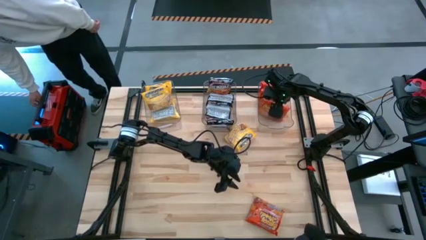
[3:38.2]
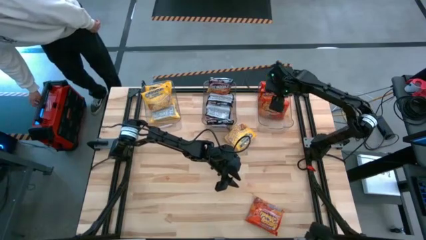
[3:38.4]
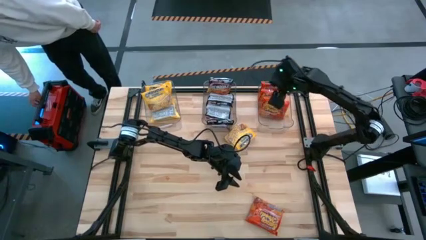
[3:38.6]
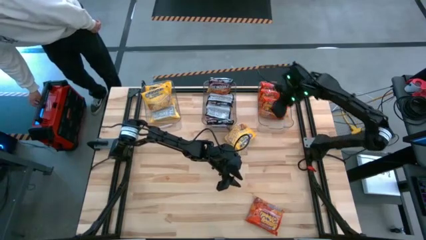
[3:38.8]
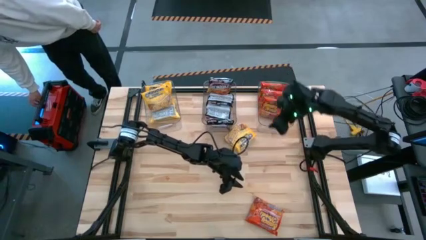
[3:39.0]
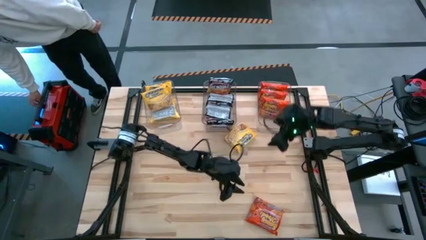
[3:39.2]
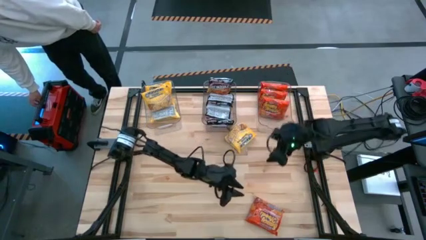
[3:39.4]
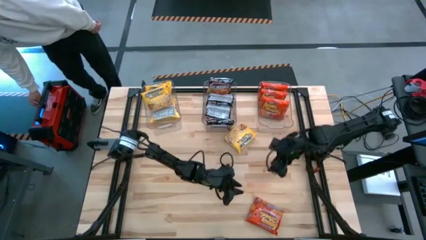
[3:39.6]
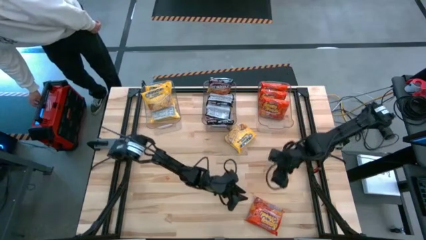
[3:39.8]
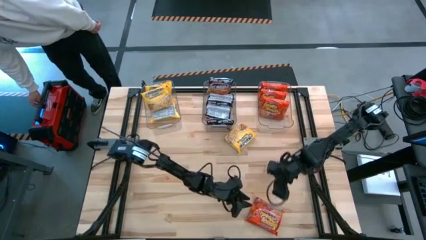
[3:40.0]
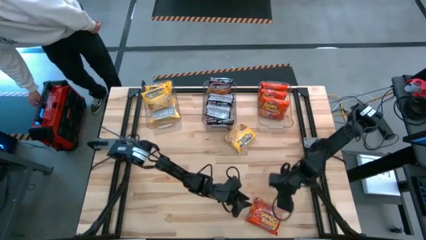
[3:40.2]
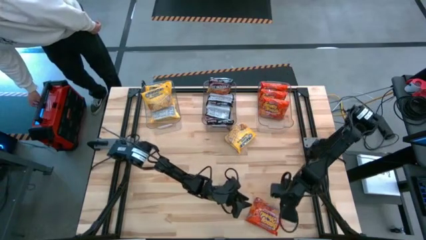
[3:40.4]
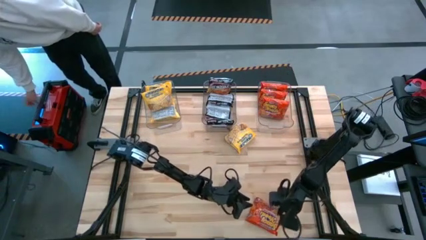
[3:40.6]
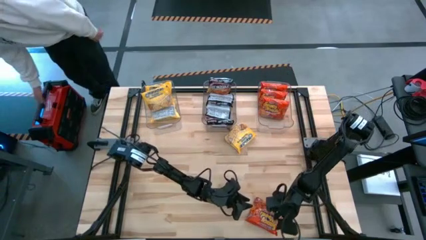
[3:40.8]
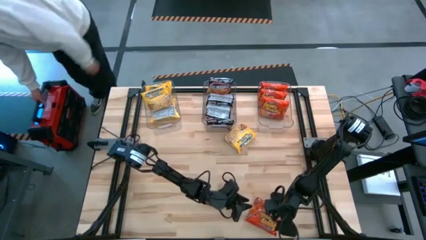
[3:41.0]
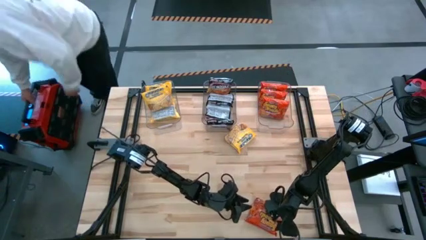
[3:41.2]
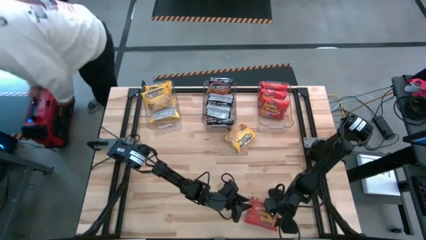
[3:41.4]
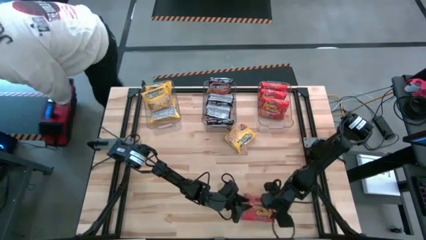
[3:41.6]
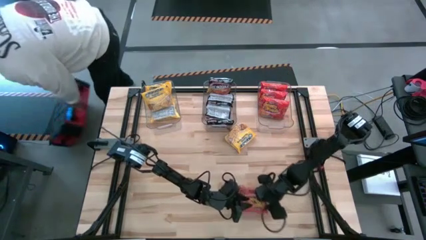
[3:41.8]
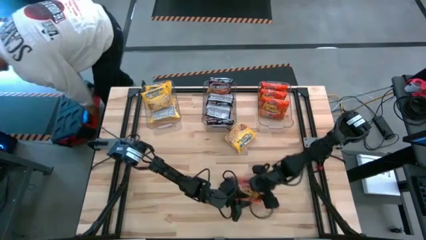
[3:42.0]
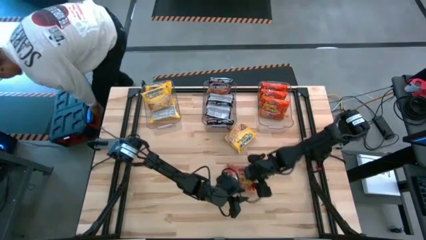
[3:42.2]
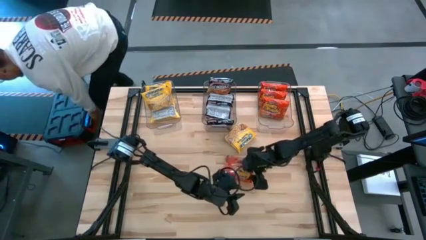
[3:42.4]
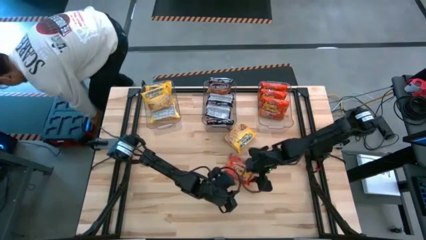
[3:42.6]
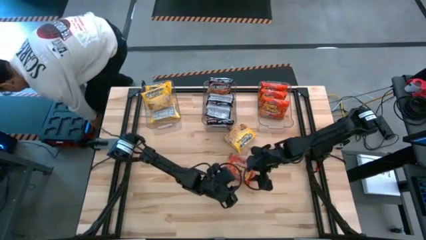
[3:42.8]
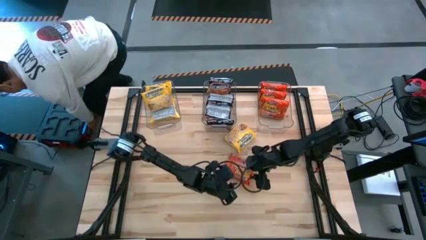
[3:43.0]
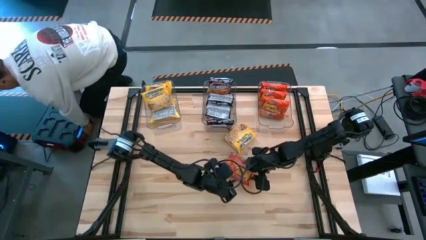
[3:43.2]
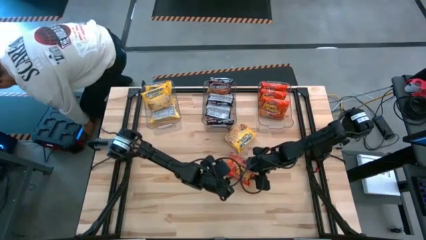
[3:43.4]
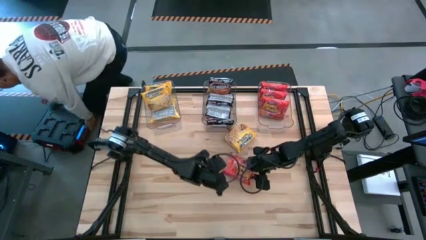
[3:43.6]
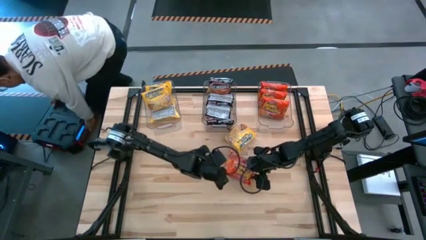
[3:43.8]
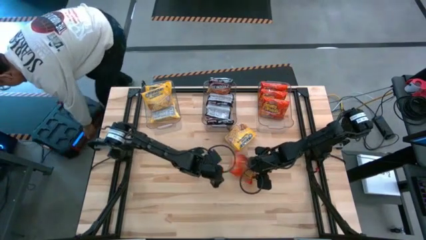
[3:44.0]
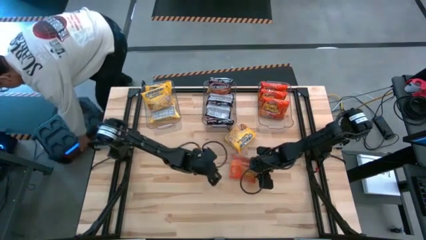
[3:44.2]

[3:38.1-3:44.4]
Task: Sort Maruchan noodles
Put the orange instant noodle pack into the right transparent bin

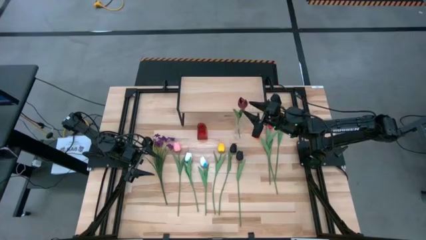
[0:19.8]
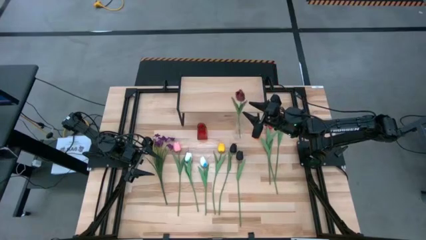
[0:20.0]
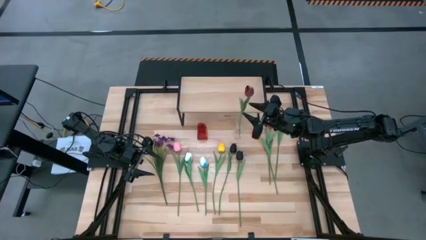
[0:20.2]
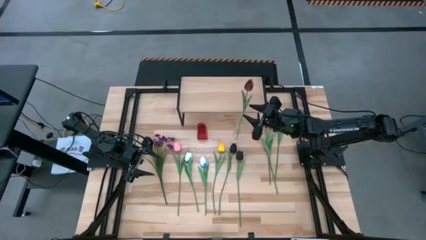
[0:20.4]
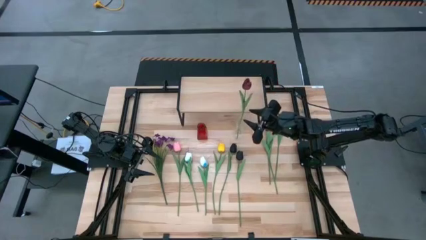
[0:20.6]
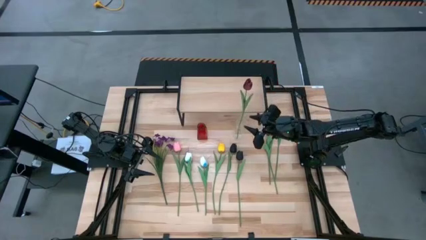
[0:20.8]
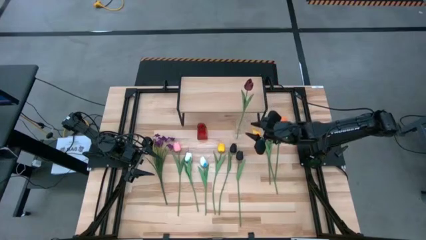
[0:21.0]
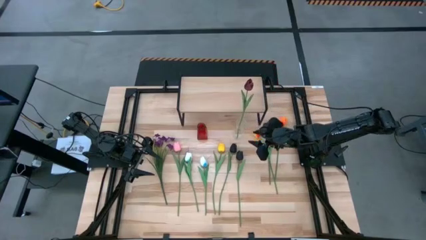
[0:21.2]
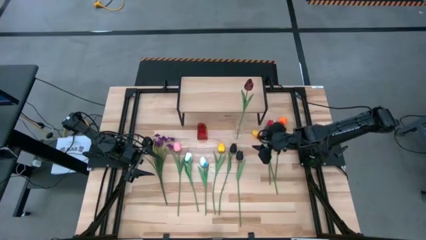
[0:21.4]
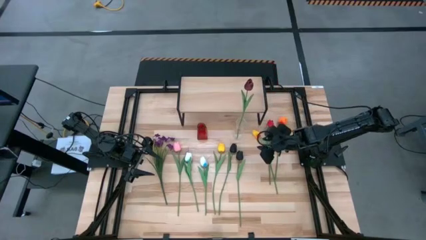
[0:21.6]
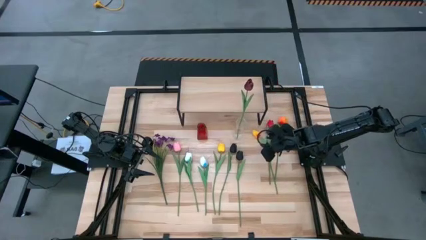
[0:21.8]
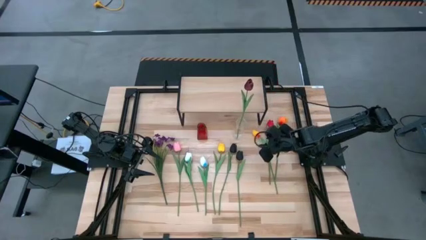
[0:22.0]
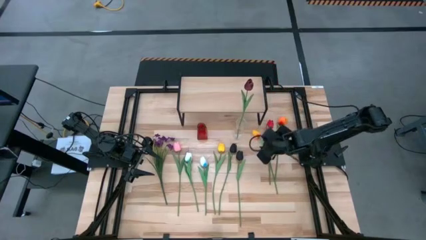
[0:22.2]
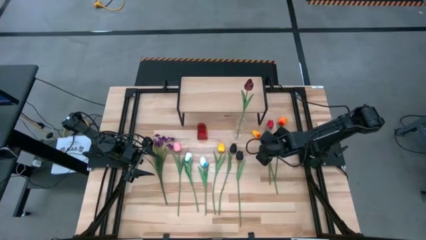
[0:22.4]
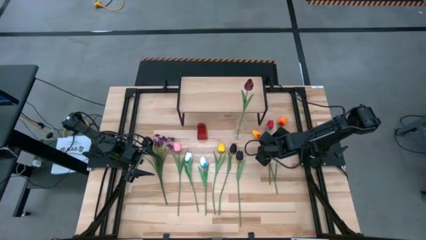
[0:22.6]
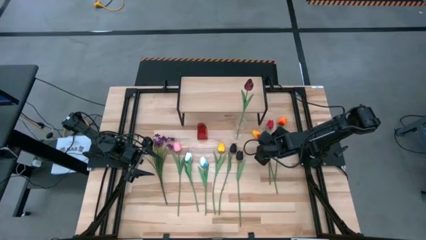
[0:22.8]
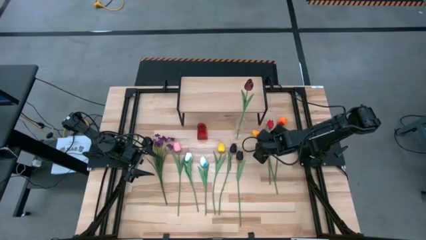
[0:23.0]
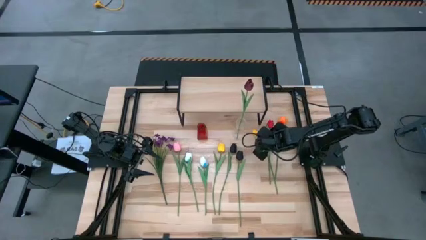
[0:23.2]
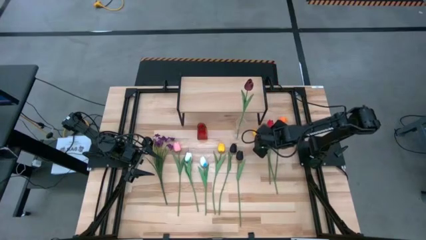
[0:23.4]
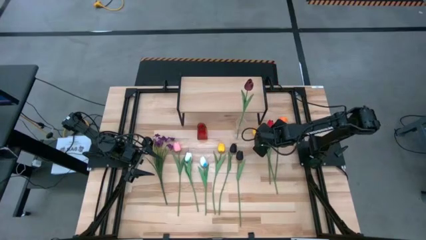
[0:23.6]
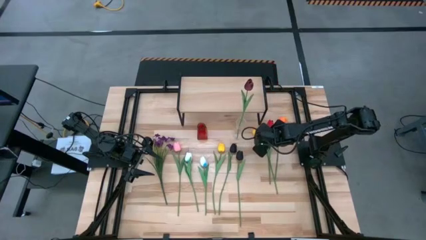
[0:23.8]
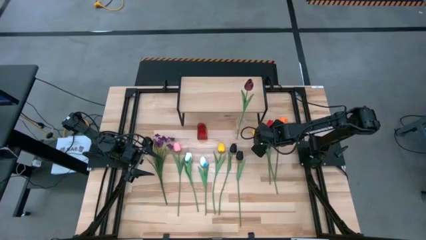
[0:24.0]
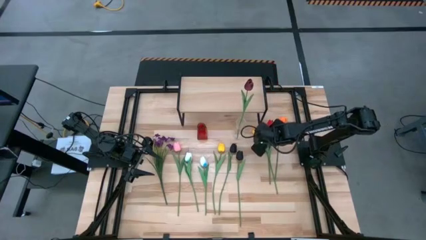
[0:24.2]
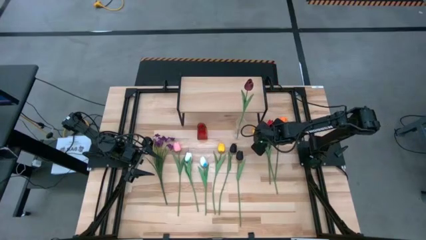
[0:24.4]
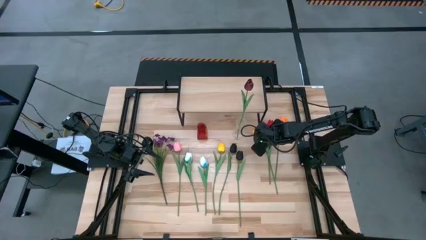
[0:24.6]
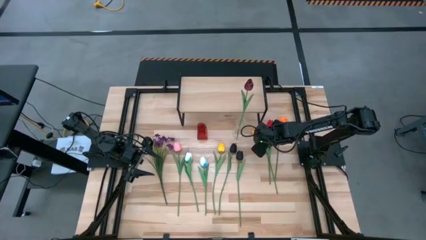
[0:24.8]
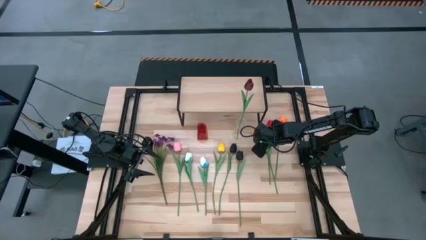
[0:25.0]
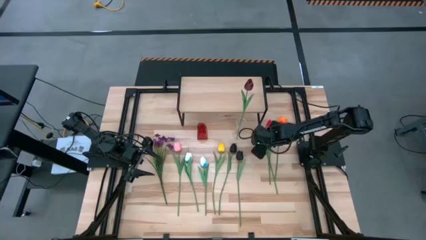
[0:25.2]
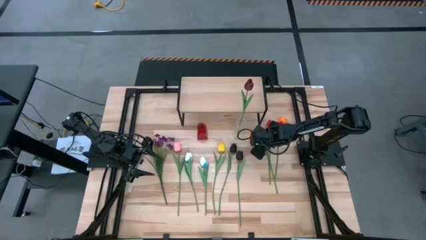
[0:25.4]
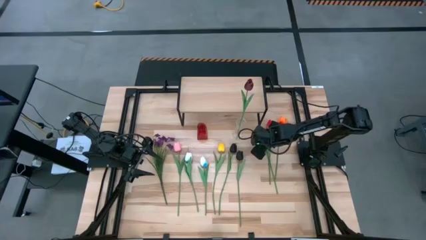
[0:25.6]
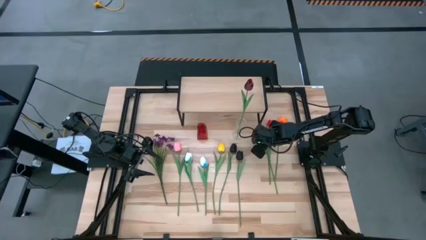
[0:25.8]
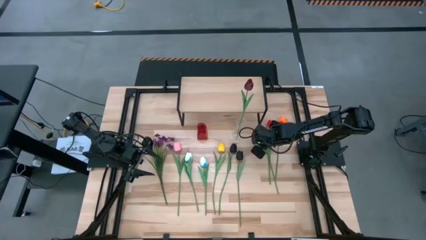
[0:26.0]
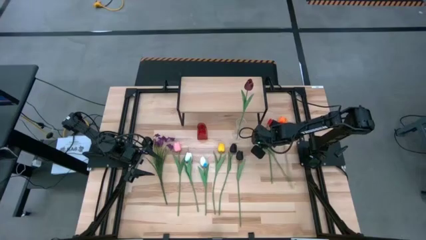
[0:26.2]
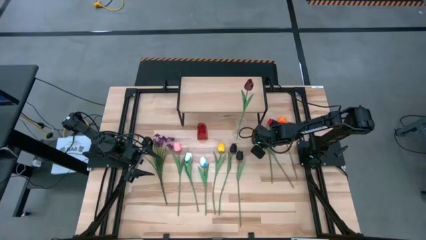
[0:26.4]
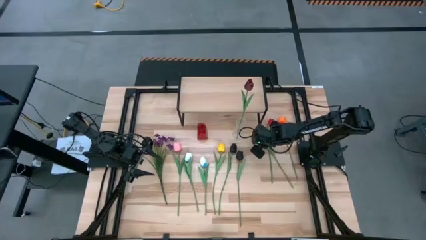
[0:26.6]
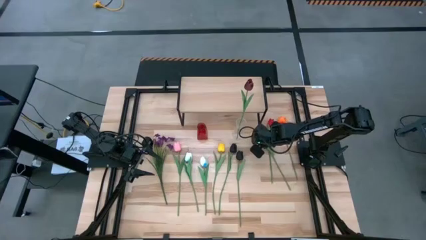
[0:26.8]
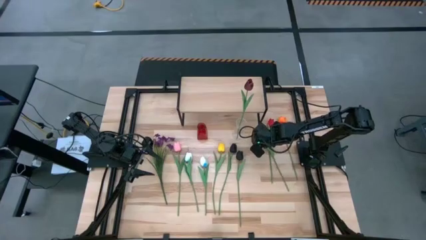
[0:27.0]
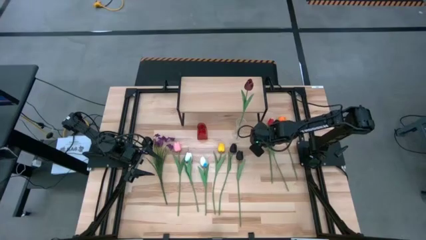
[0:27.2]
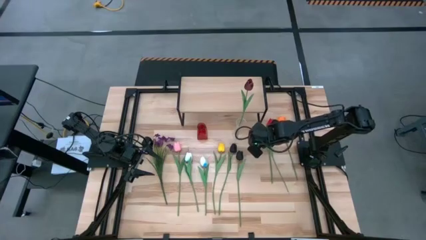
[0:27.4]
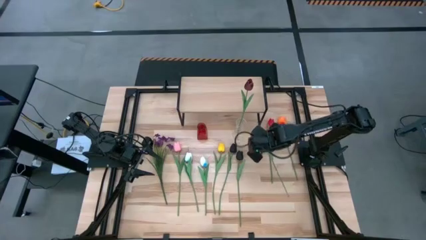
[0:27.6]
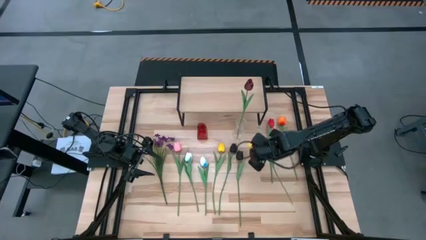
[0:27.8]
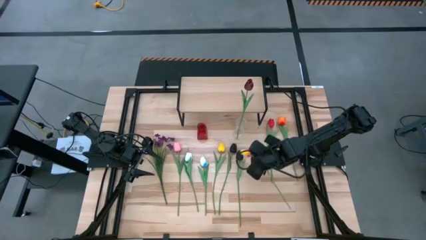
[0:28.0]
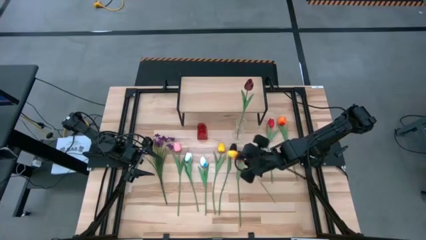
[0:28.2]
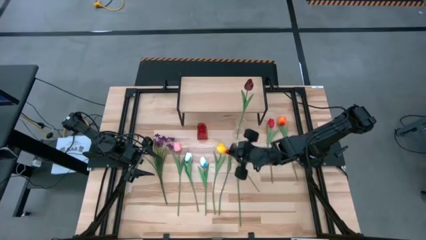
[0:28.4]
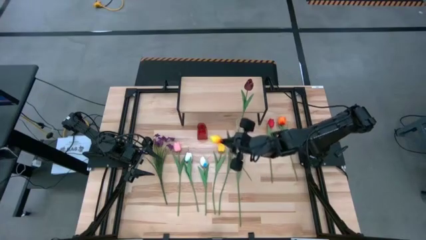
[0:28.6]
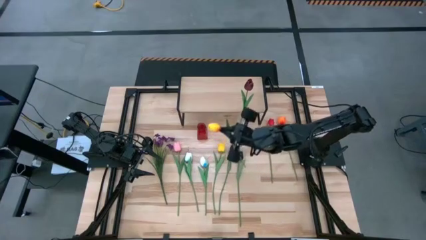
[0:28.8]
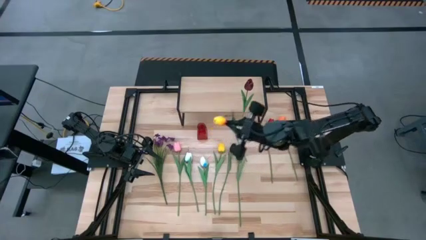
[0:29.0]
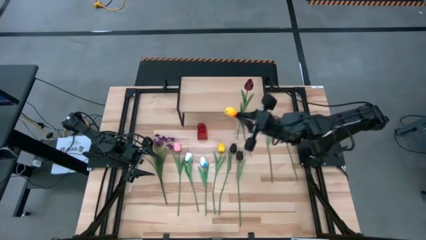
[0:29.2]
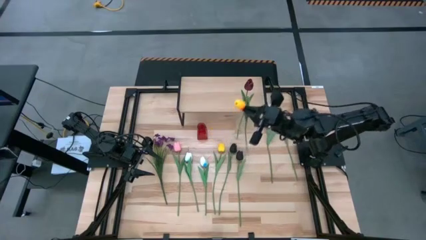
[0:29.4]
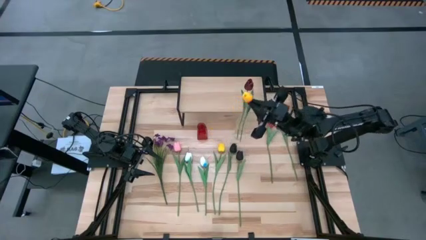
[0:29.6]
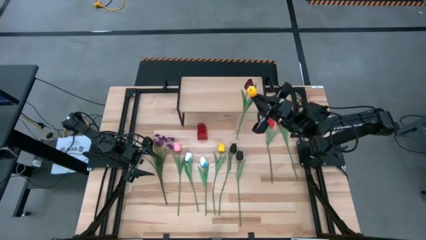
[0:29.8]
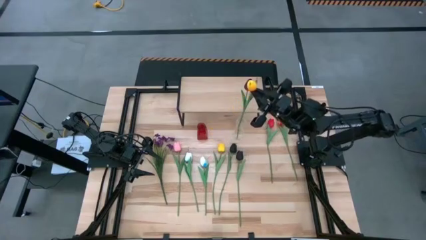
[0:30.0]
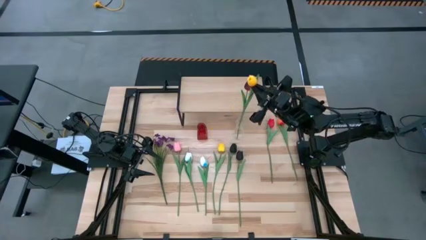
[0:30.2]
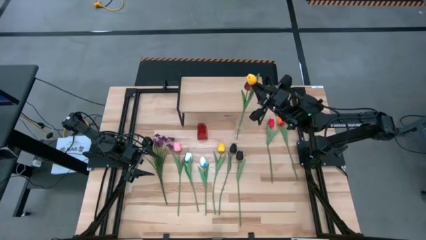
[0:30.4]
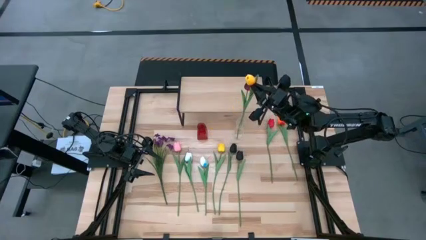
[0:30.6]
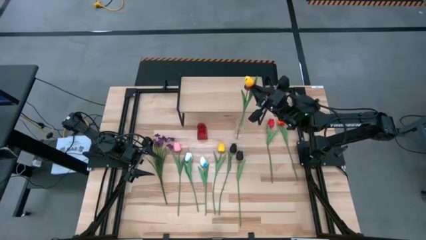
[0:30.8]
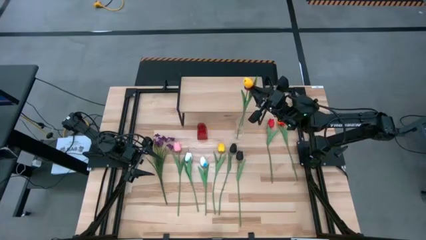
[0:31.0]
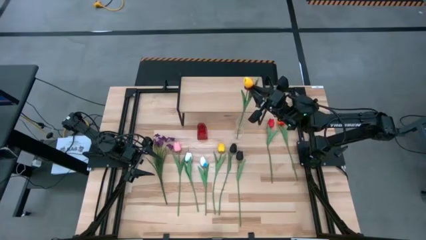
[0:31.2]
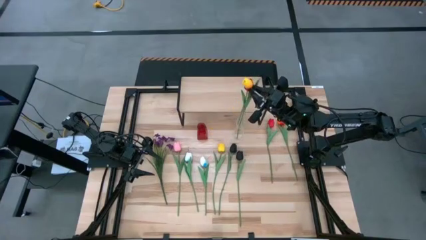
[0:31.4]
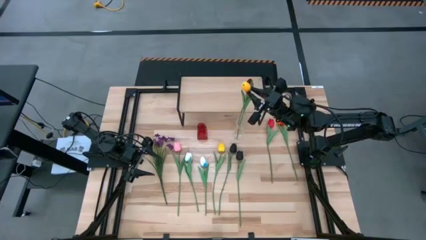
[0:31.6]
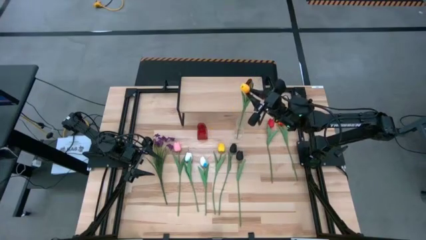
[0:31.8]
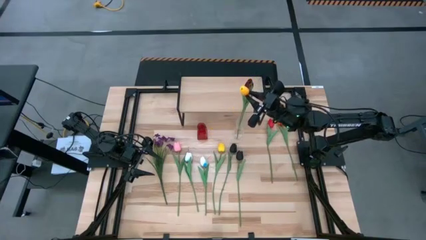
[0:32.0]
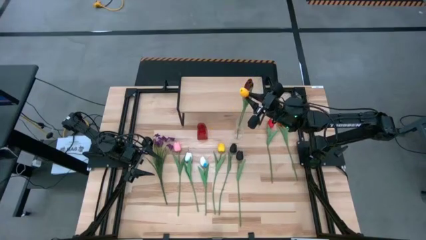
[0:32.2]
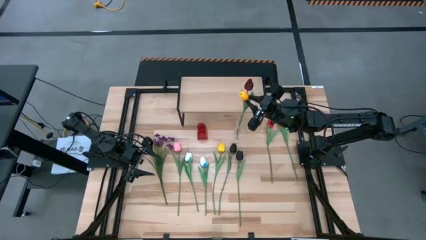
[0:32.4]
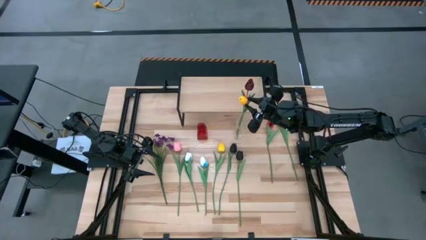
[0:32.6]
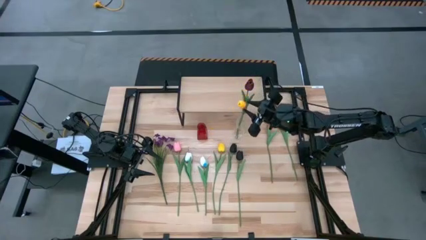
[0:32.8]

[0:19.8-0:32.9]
Task: Pick and place flowers into a vace then onto a shelf
Put the light orange flower into the transparent vase
